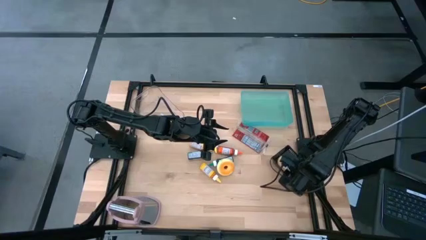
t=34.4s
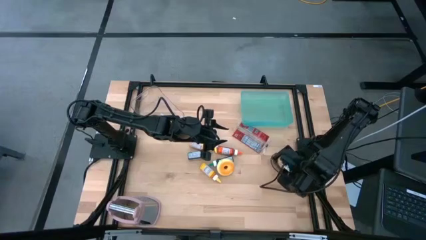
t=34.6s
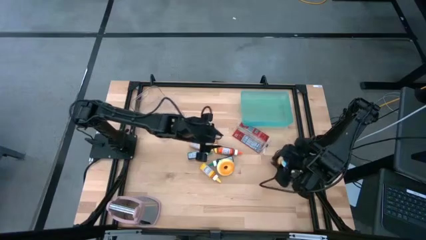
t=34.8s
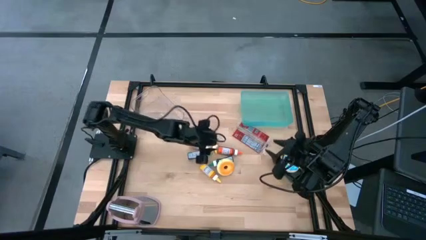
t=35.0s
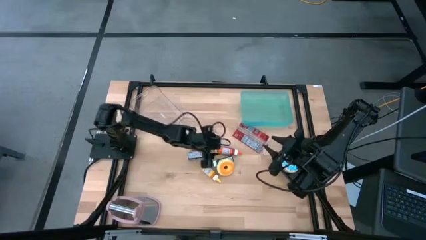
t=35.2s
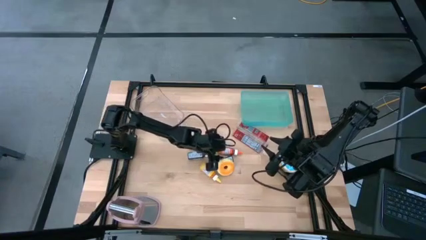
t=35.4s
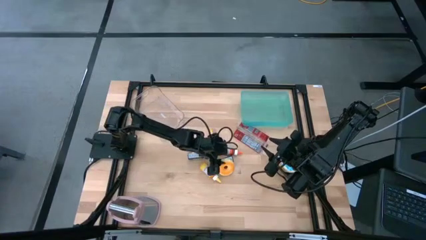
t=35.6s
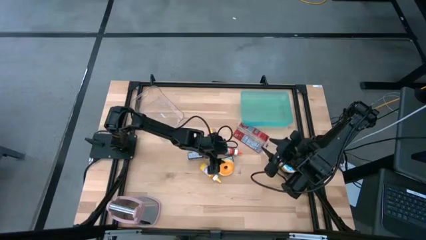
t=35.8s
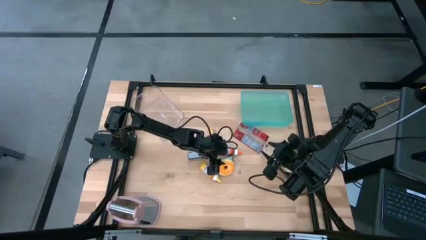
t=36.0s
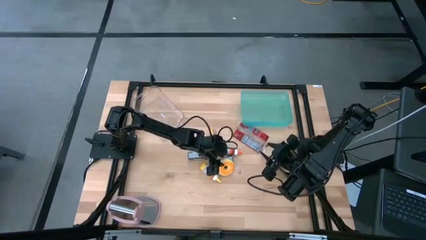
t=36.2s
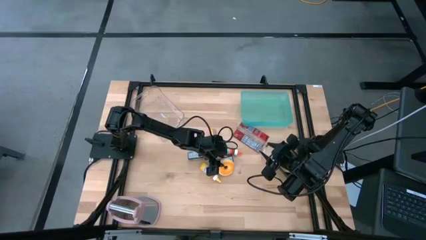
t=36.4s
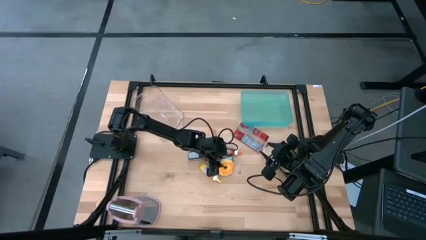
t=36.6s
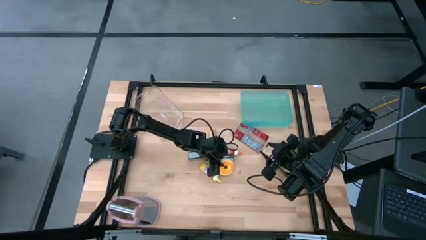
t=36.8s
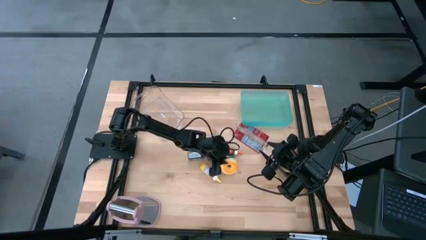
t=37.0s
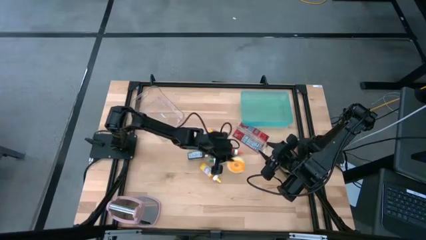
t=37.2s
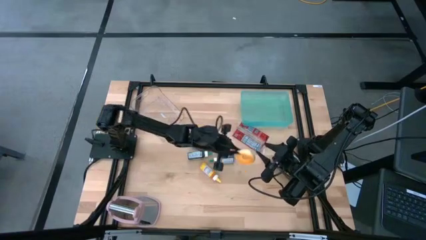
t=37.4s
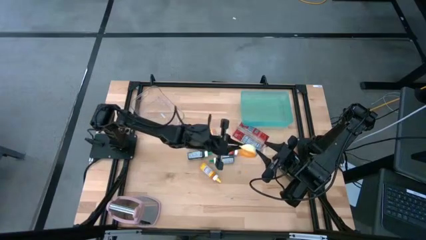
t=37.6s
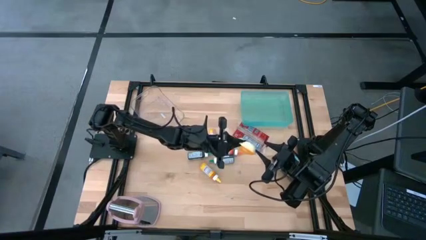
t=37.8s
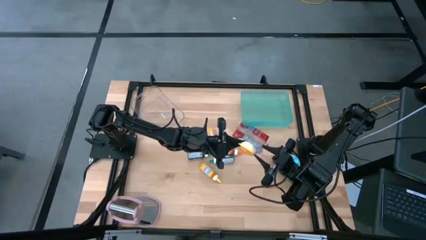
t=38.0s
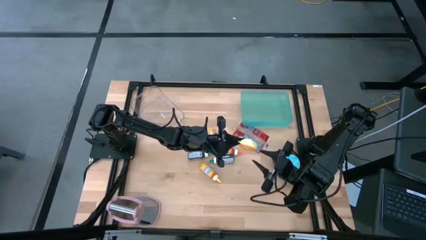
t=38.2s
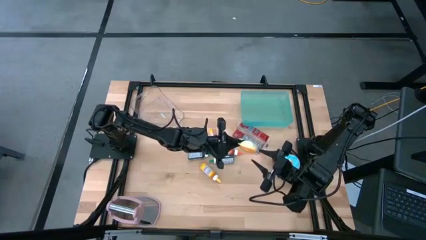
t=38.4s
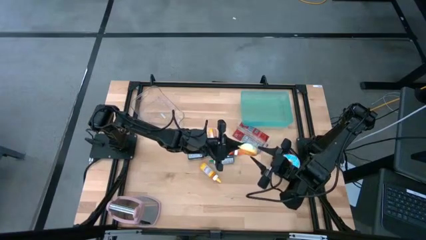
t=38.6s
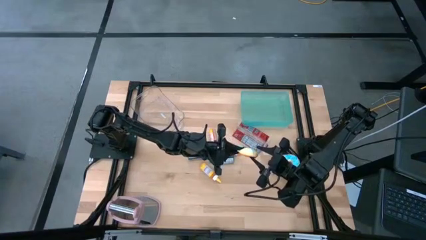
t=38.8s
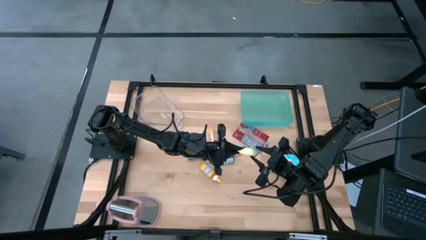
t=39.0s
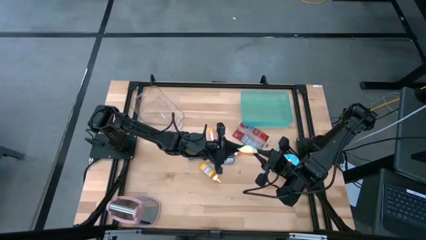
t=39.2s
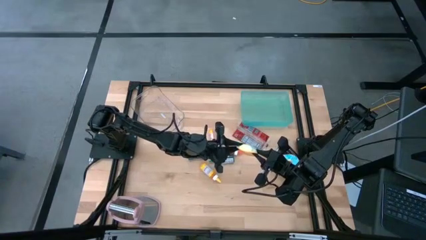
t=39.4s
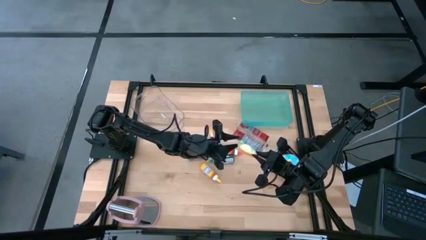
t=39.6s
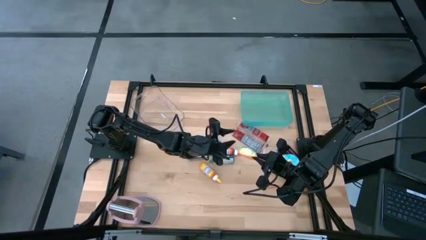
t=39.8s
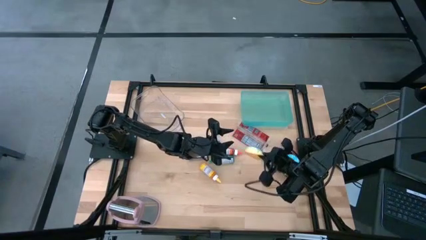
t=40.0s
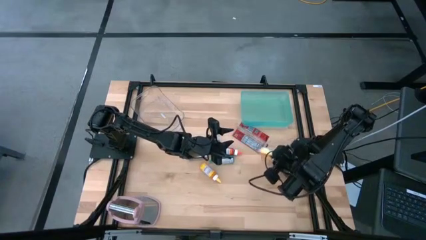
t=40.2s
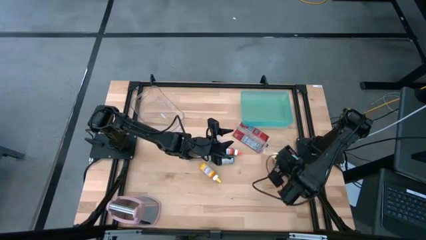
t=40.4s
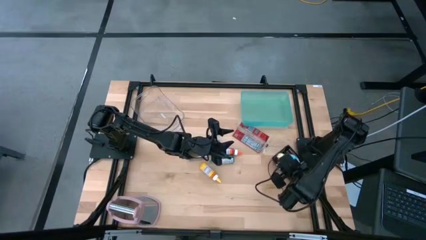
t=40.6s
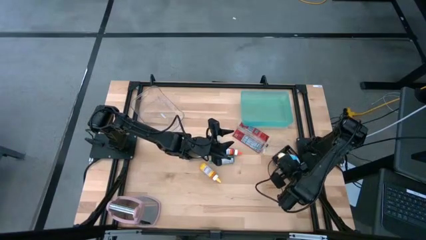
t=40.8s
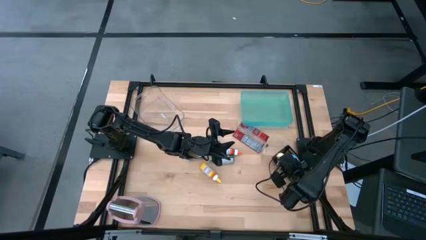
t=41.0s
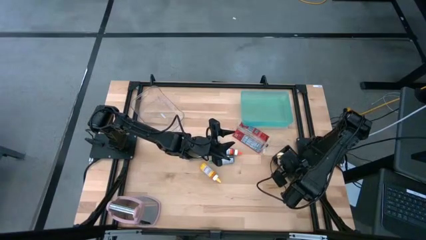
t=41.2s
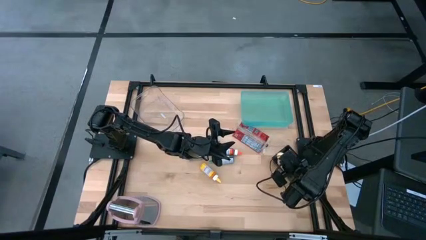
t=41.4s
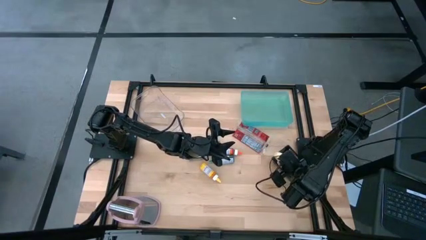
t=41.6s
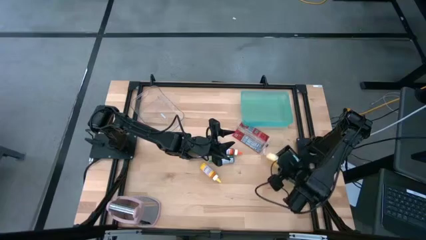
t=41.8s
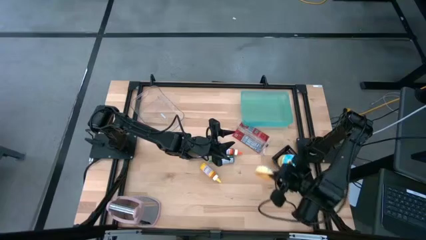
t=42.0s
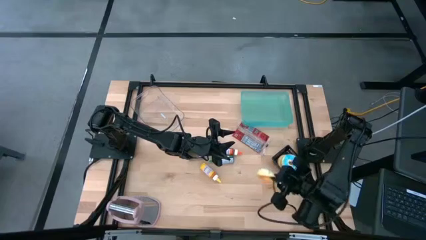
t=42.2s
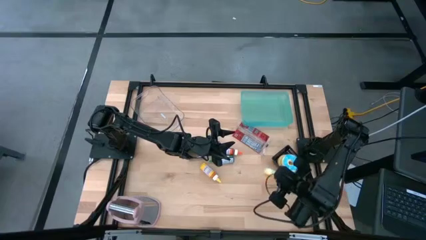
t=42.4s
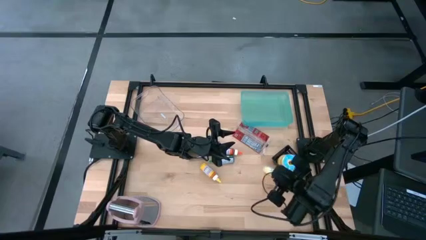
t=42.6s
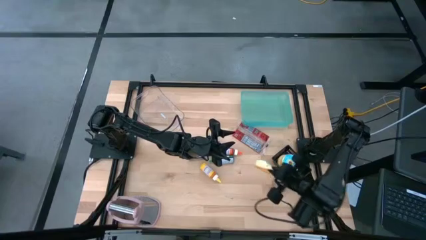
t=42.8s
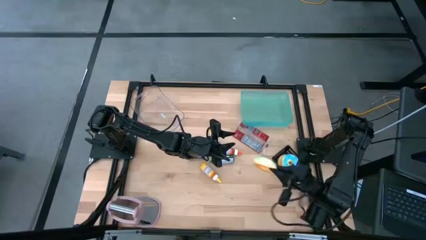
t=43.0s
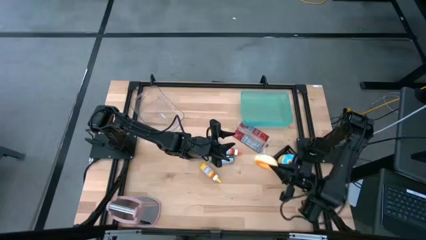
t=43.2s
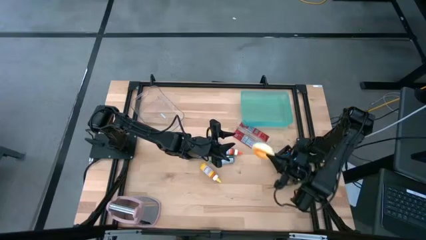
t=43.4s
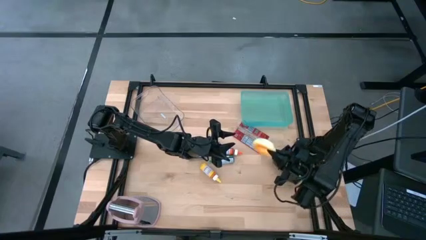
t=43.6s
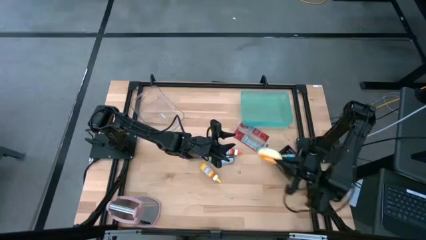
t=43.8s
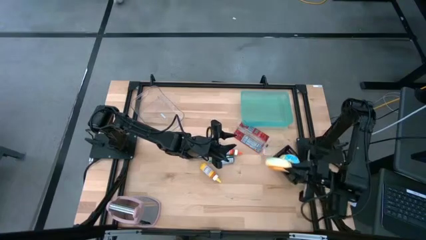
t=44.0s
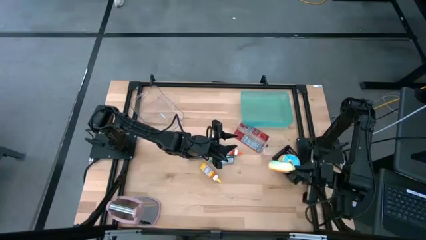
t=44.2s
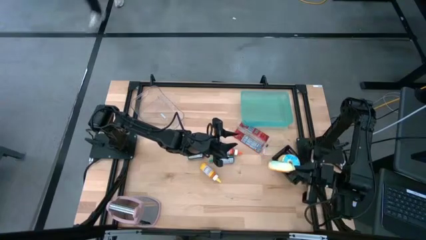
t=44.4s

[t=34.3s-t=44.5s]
Put the light blue donut into the black bin

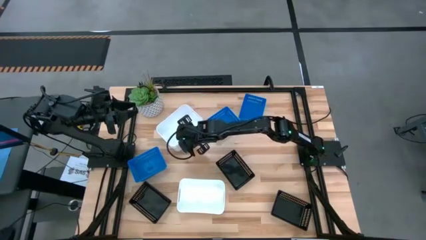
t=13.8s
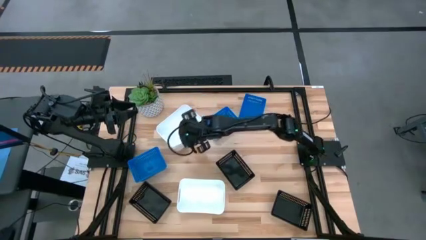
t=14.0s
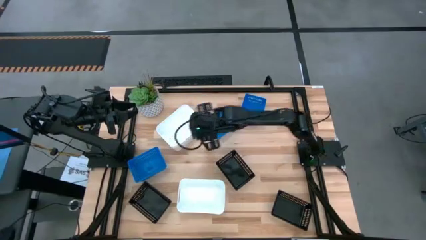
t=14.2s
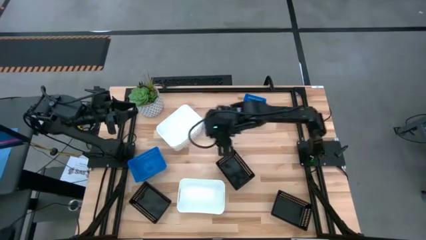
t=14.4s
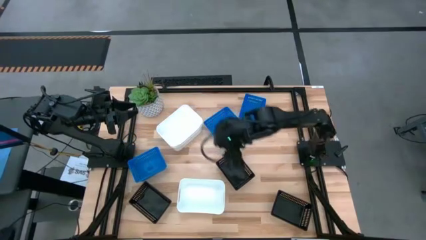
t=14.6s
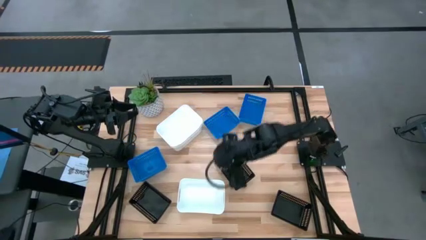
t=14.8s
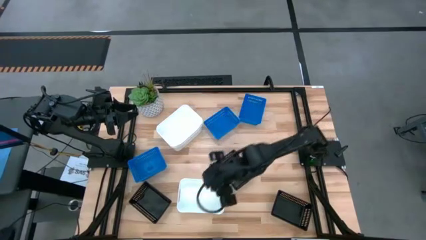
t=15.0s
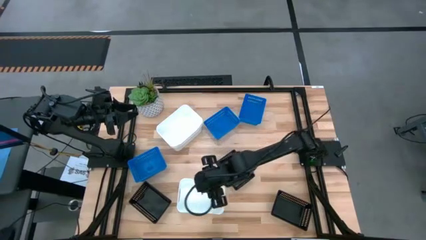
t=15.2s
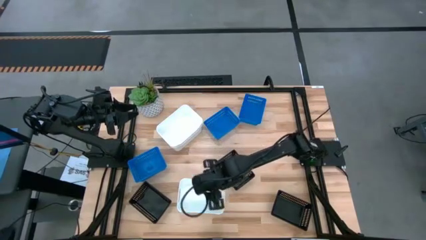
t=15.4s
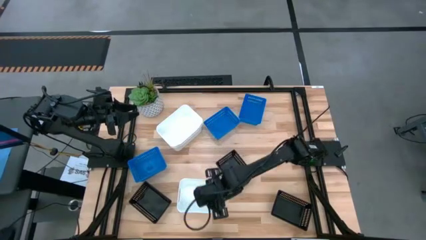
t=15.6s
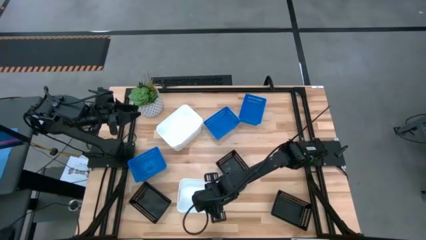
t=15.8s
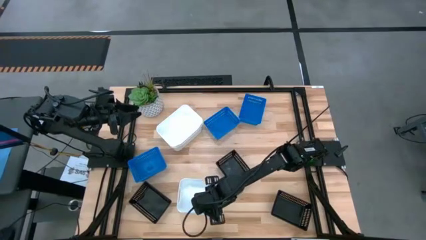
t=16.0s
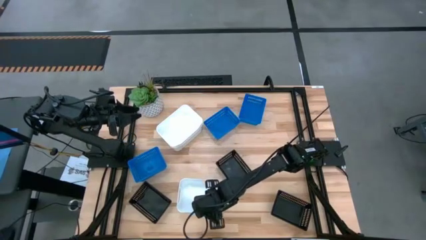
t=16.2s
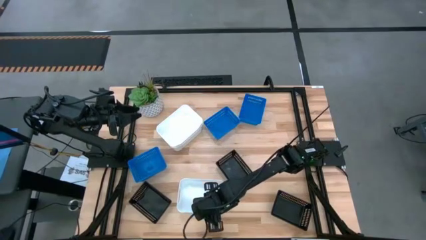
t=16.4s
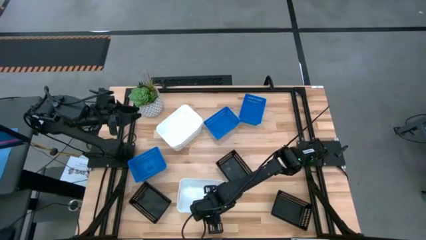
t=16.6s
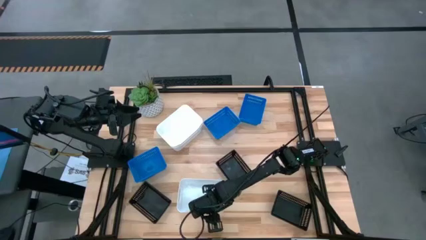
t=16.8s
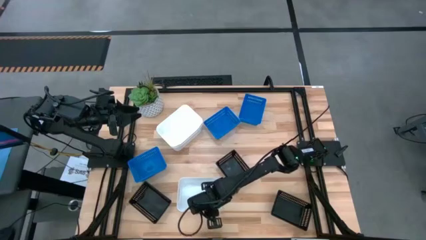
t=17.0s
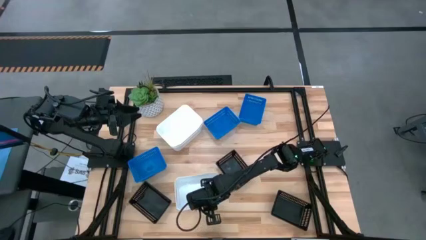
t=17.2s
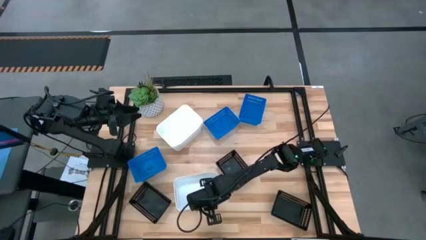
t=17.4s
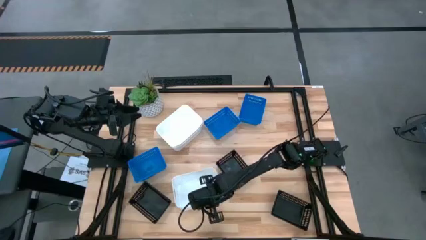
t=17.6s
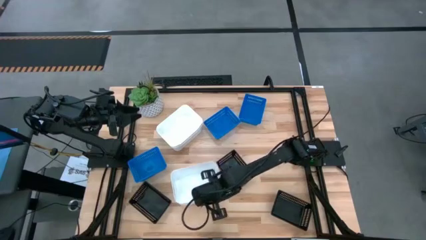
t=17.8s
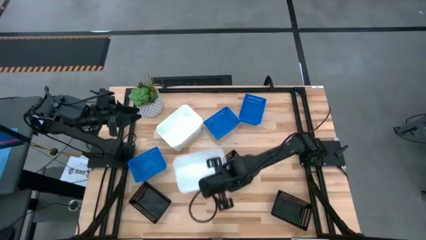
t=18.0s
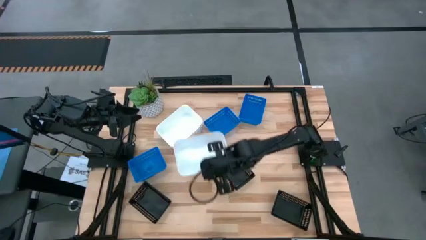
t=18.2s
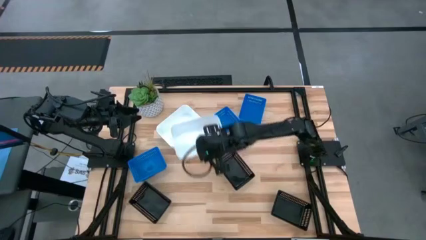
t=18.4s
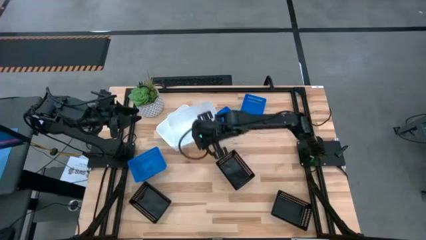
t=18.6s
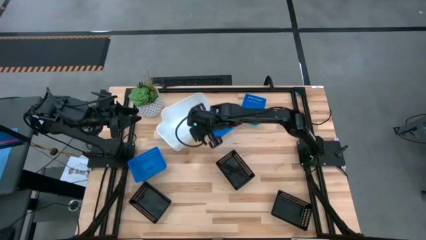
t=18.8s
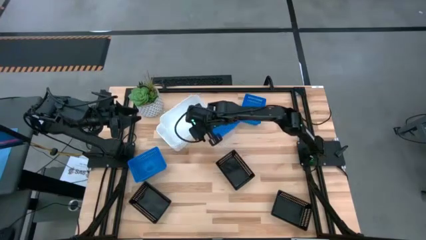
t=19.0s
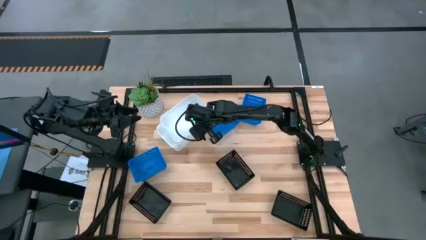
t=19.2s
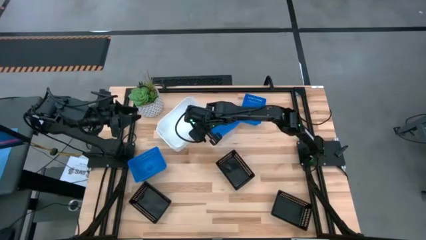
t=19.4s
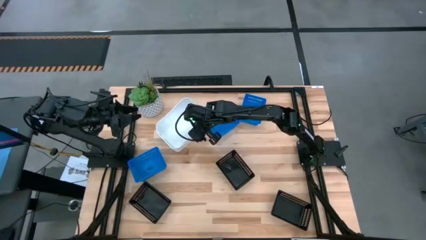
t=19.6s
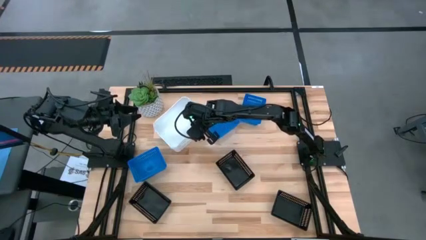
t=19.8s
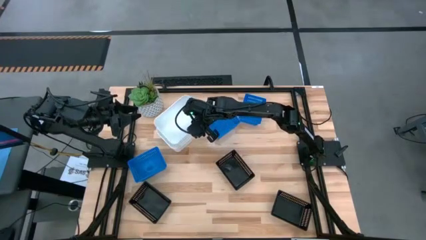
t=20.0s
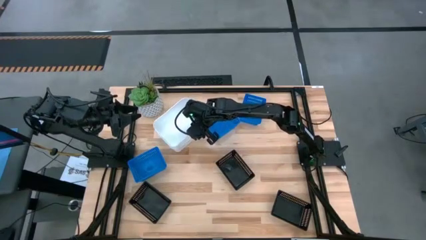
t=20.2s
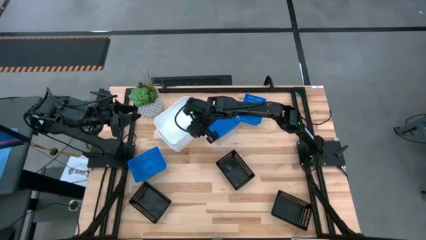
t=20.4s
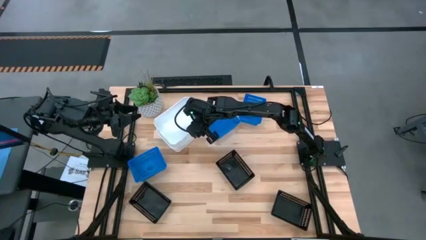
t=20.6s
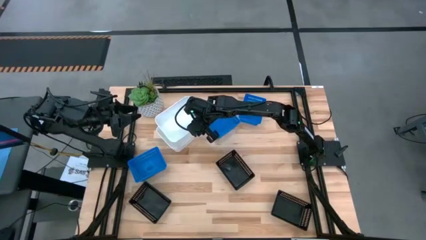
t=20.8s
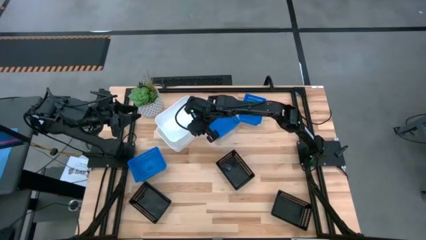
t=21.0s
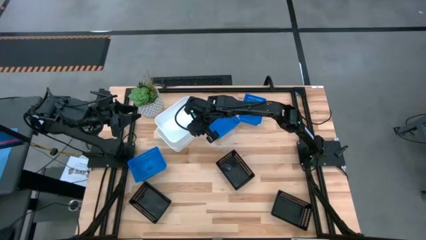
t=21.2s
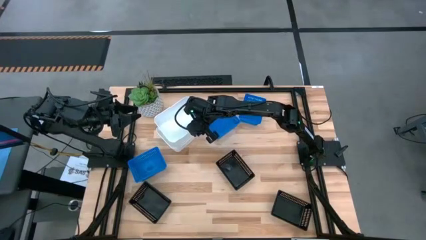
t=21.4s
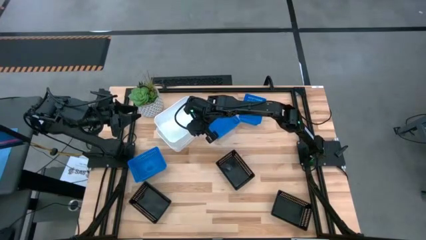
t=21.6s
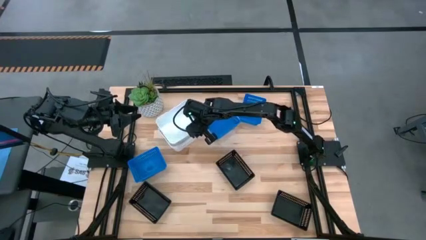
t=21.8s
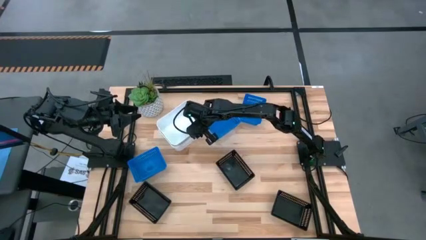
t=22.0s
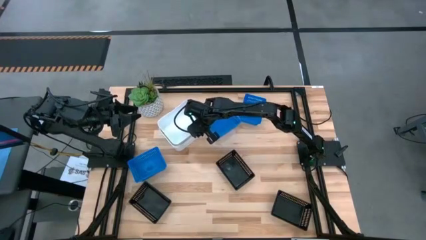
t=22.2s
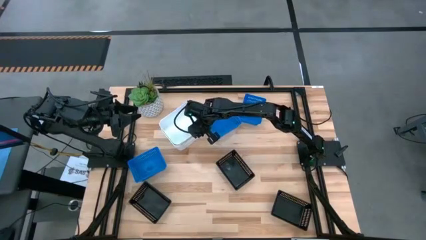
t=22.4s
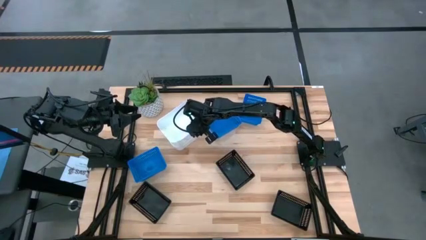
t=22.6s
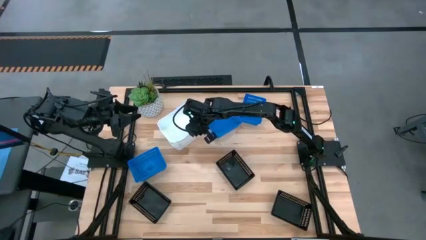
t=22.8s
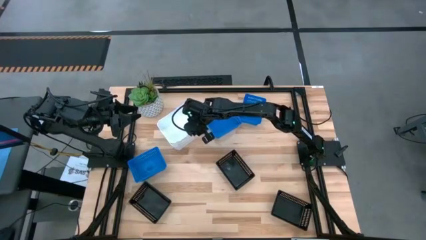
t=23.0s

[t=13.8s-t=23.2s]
Stack the bottom white bin on the white bins
